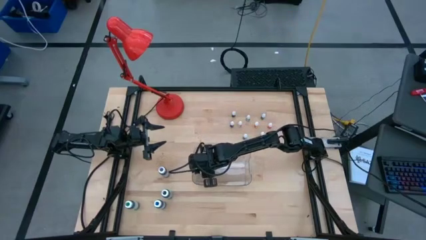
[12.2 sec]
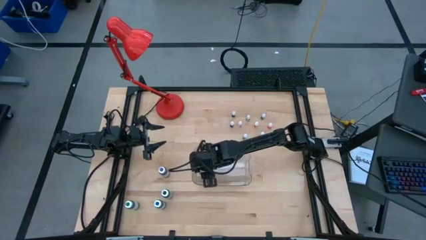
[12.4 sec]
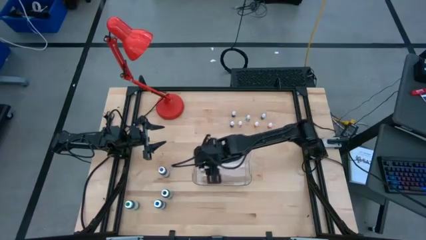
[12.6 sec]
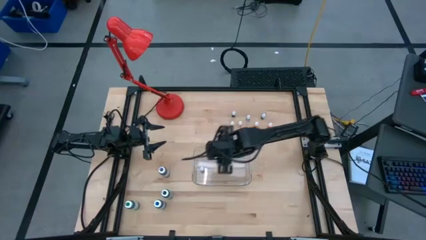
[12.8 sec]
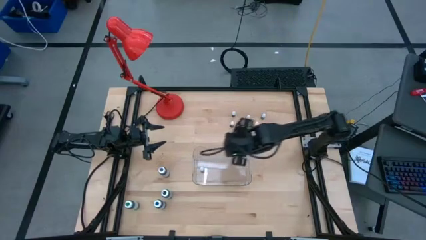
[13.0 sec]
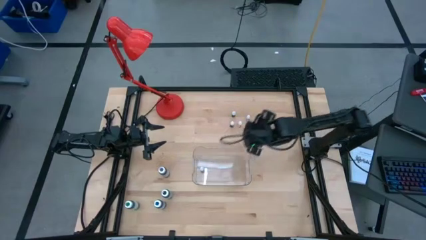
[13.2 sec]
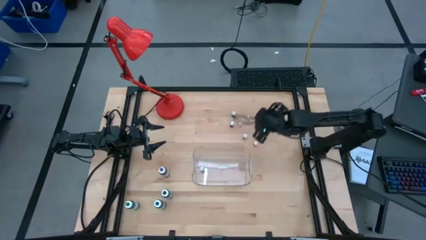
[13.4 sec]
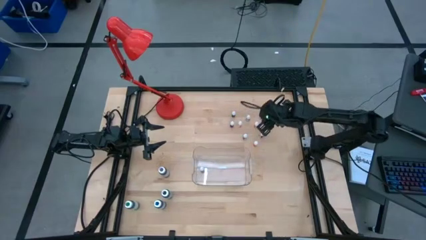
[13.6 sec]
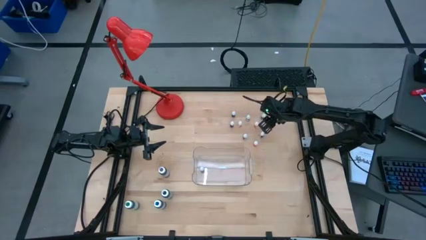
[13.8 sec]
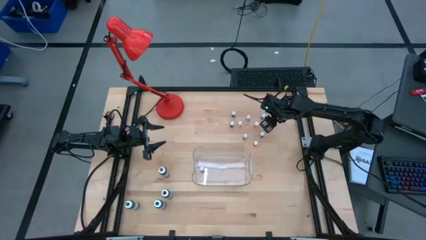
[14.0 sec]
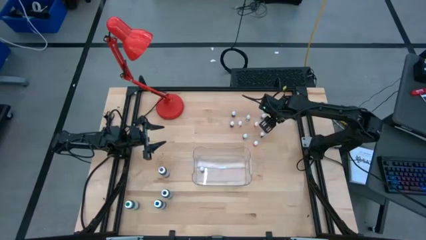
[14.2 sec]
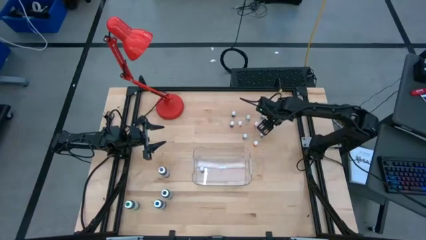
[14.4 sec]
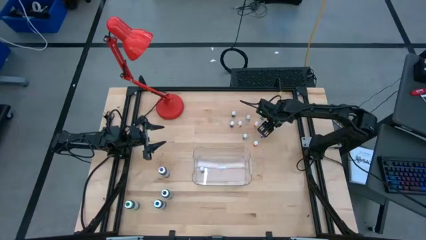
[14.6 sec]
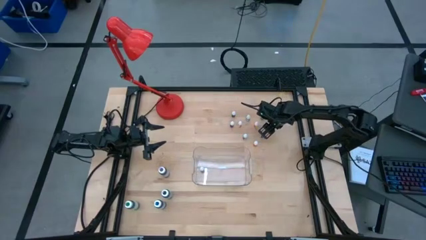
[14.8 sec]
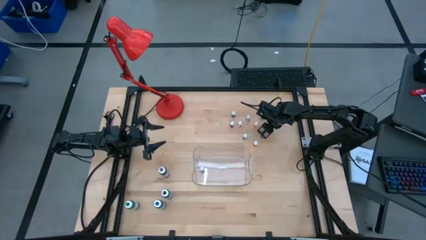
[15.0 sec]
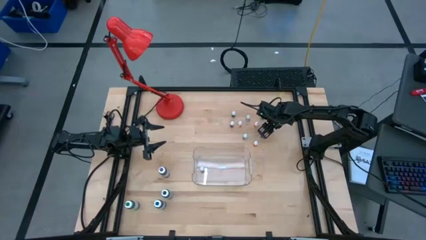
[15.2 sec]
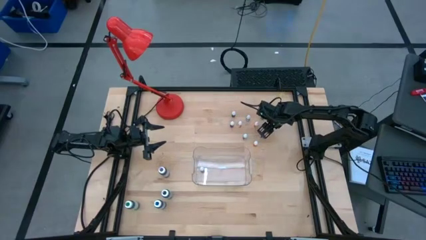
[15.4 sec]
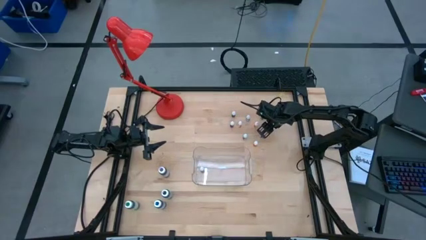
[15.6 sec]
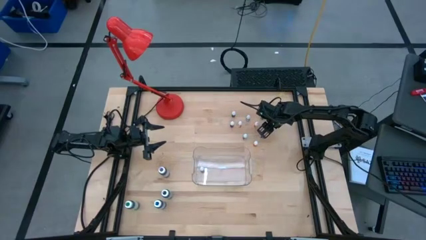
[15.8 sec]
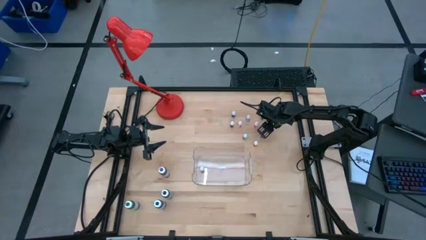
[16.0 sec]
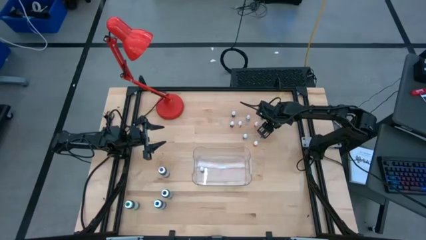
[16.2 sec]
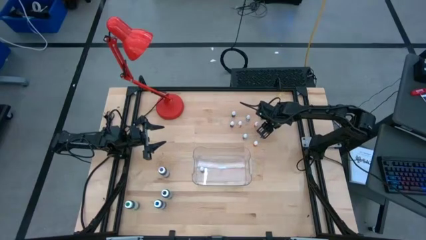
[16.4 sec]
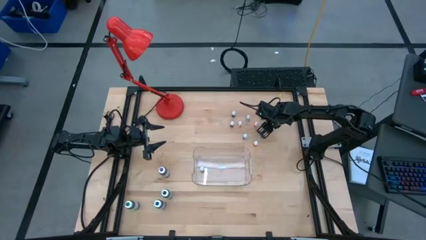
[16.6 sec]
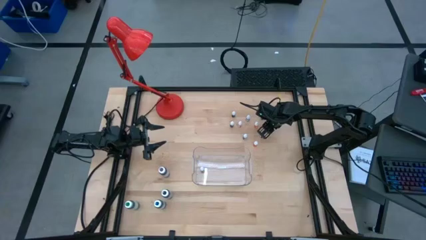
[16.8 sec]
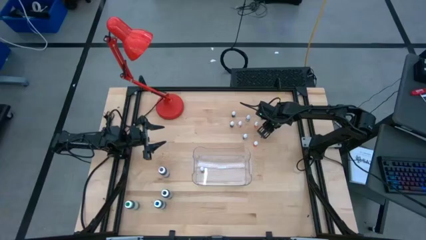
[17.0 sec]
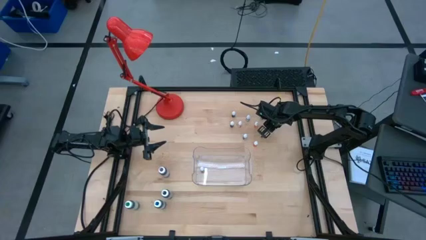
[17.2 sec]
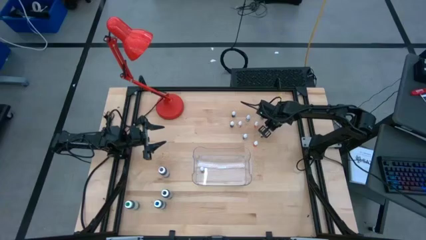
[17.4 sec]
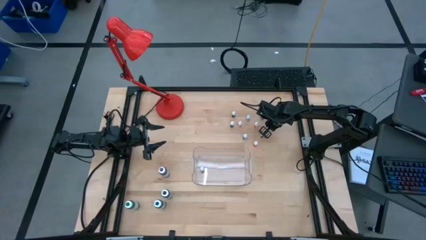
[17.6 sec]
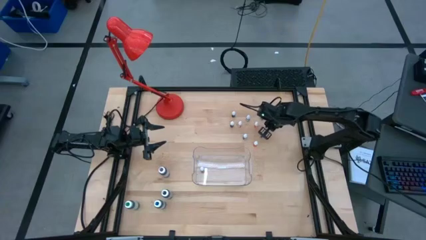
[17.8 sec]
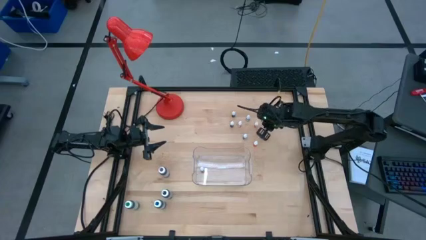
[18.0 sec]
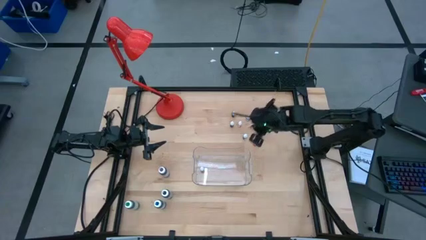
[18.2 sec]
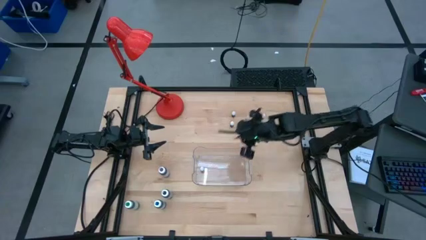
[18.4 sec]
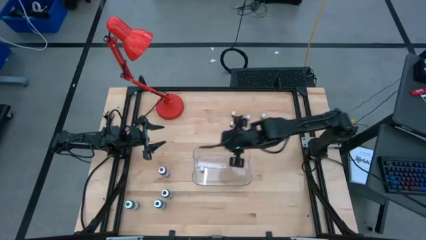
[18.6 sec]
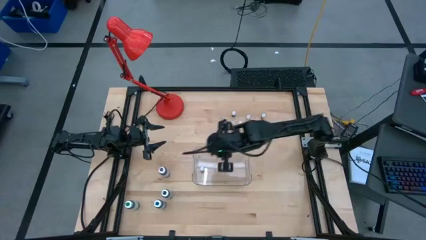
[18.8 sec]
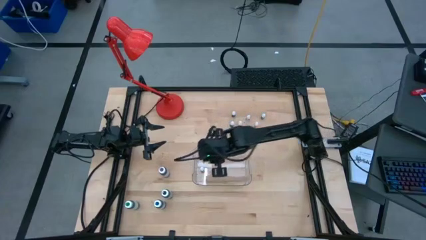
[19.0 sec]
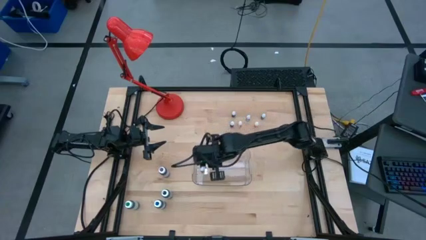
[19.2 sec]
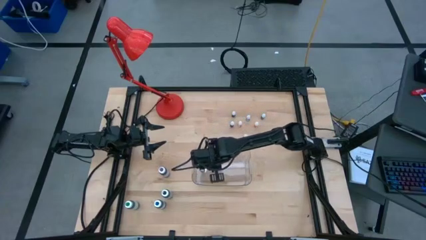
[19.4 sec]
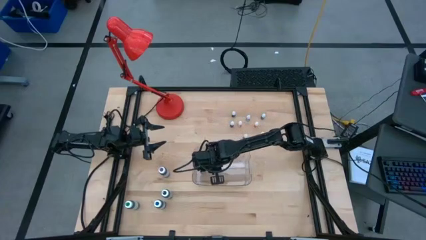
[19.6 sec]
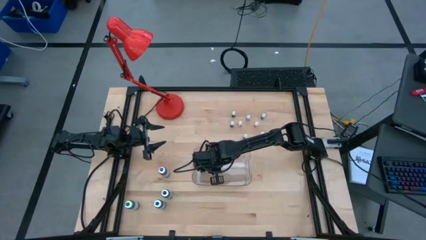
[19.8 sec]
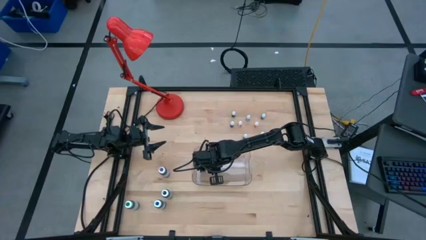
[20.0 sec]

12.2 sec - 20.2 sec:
Task: Pick & Place food coloring
Put the orange food coloring bottle into the transparent bin

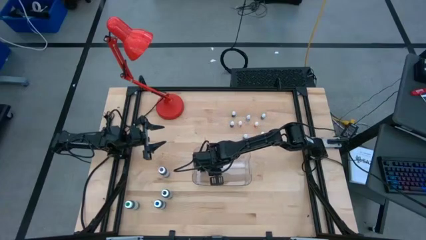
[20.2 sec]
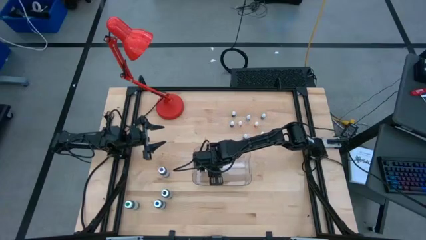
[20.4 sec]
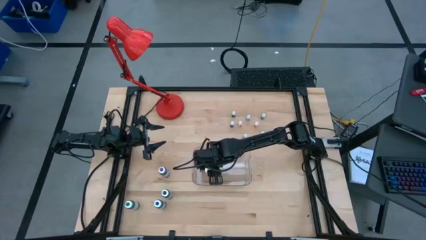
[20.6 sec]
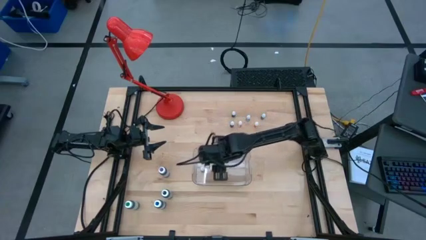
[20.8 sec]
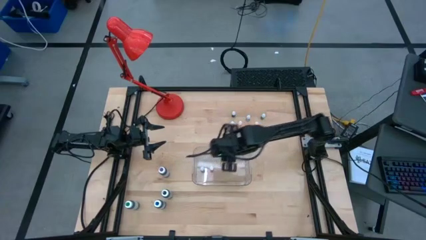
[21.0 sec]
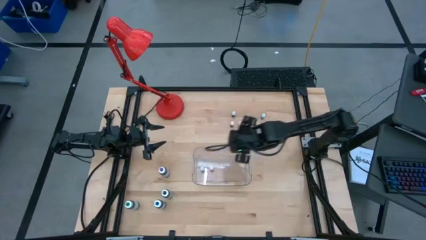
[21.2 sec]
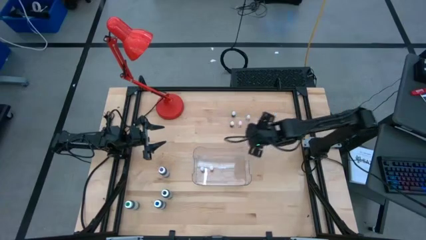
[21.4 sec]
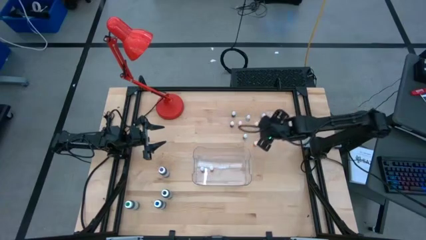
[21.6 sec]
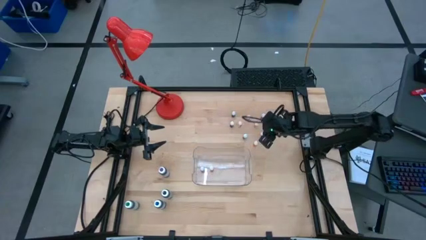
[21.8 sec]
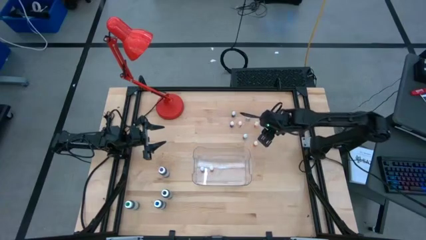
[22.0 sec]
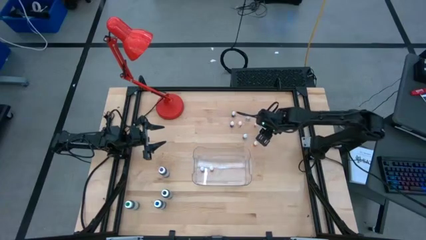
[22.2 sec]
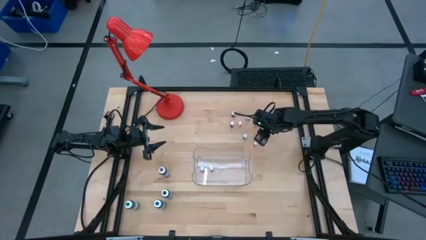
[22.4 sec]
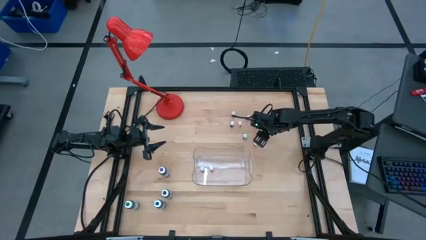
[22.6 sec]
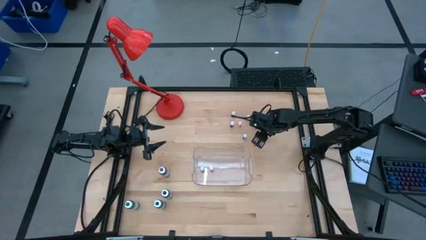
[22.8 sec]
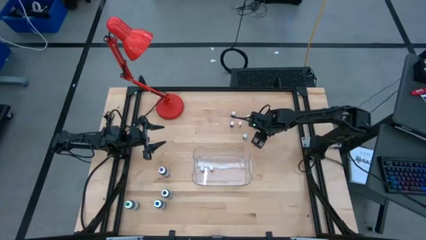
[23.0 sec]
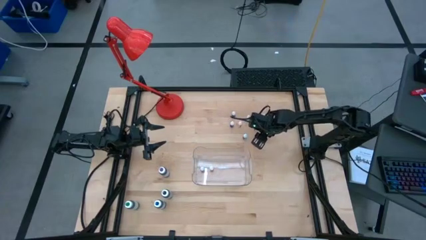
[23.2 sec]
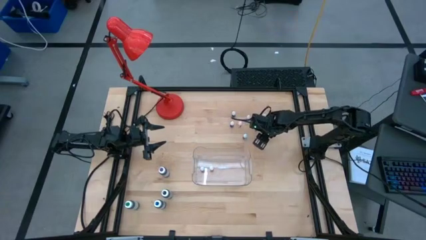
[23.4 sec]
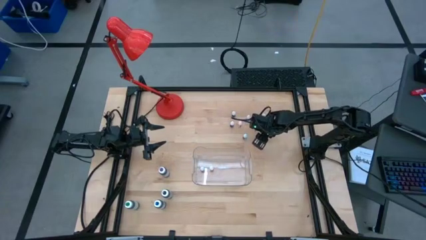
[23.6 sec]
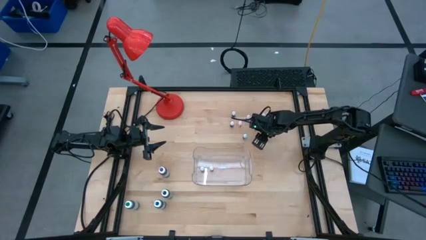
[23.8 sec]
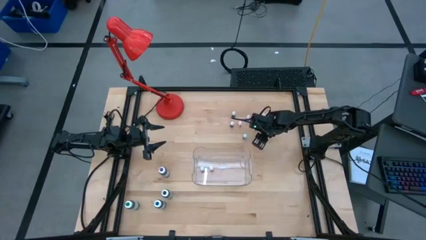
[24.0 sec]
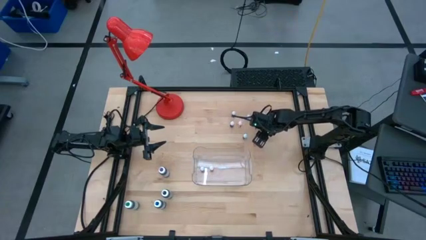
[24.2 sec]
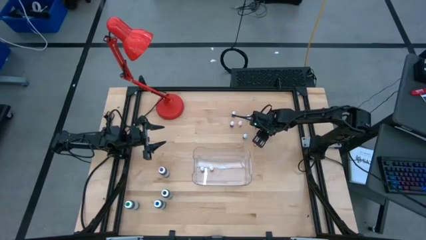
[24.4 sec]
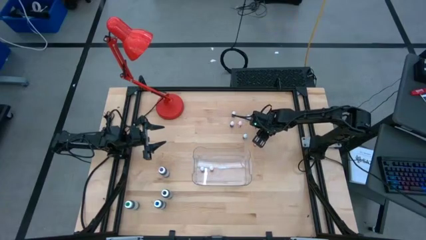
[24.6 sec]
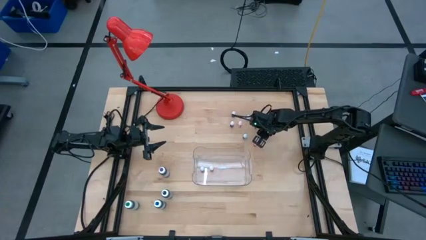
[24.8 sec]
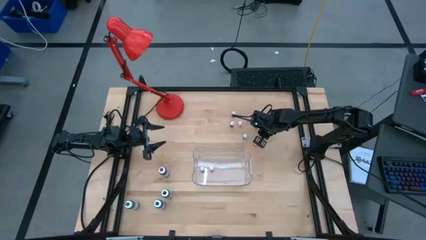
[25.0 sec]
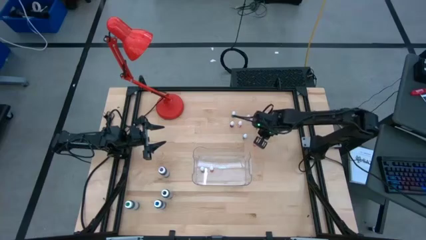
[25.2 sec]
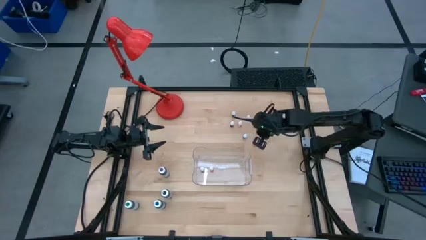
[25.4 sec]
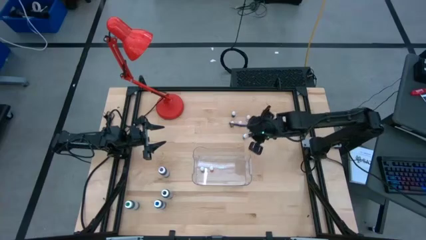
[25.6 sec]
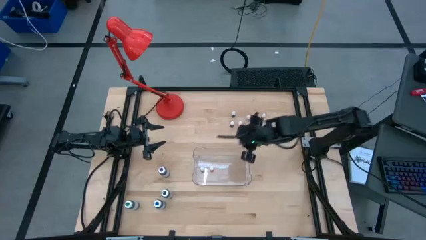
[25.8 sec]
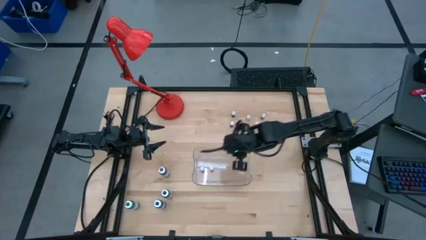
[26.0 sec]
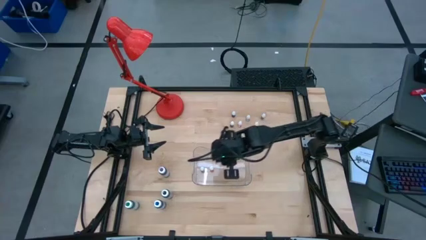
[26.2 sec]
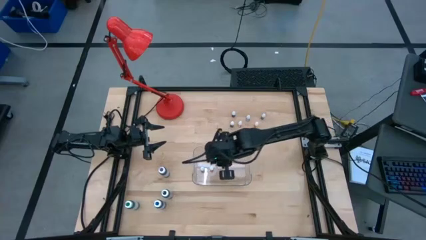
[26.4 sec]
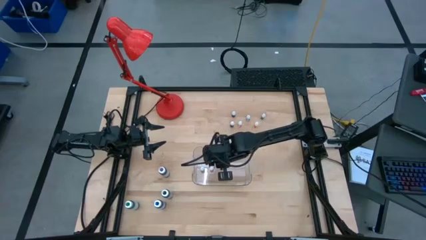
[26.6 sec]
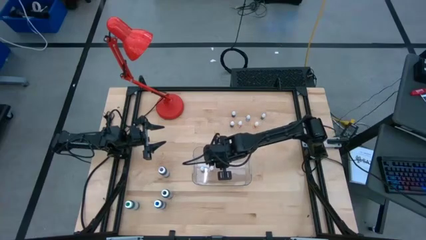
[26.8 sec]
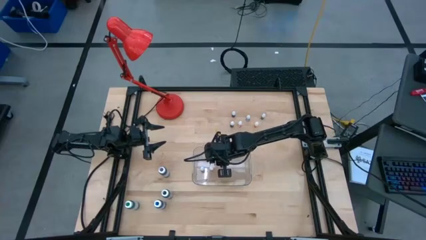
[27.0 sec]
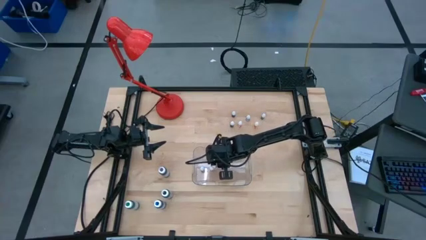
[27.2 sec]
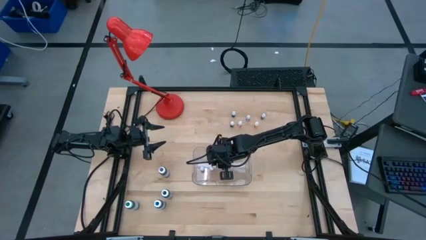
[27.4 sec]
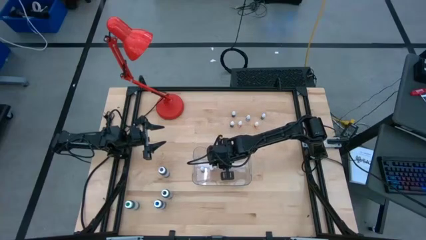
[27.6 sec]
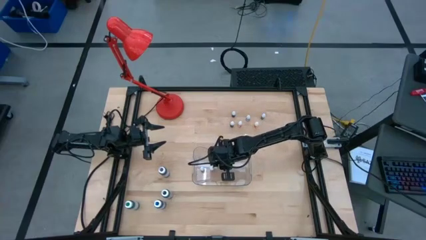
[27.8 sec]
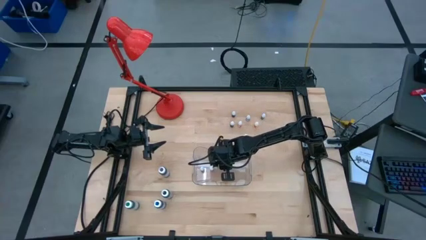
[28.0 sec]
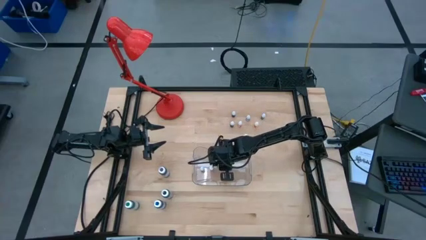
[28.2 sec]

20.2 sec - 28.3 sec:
Put the small purple food coloring bottle into the transparent bin
